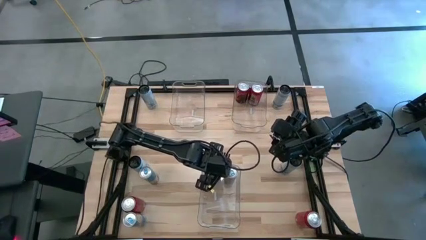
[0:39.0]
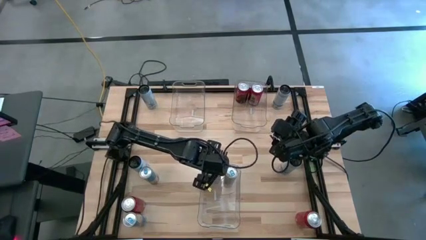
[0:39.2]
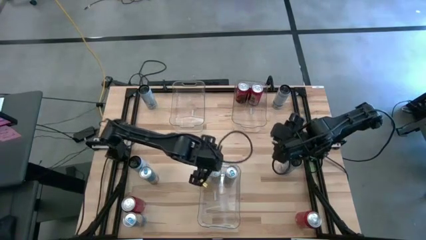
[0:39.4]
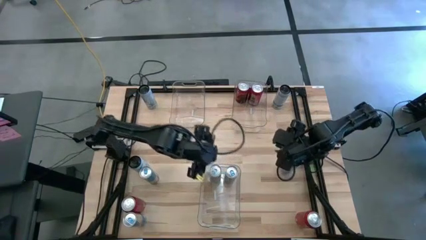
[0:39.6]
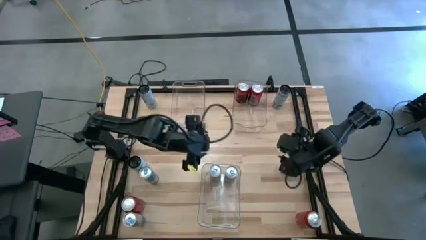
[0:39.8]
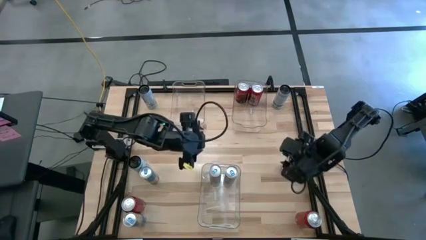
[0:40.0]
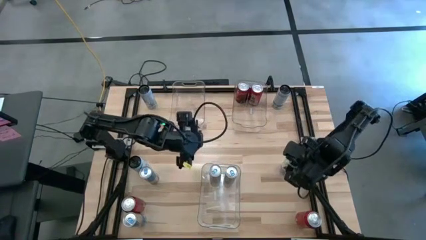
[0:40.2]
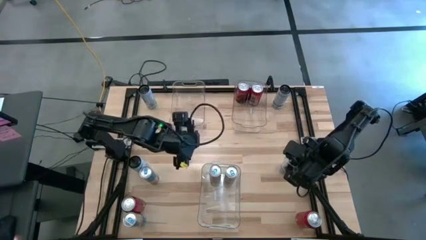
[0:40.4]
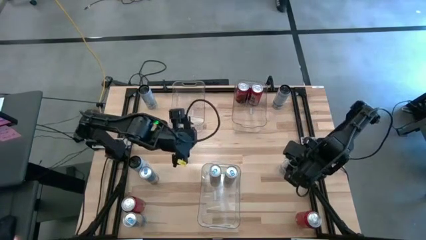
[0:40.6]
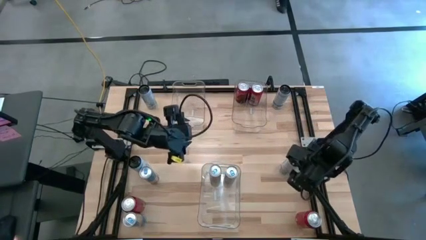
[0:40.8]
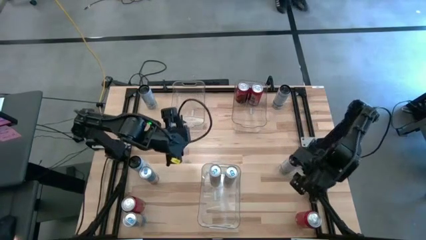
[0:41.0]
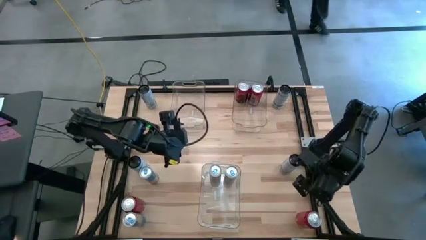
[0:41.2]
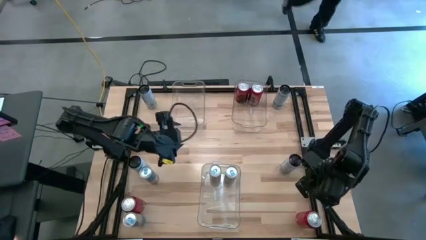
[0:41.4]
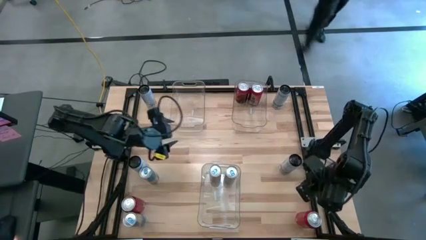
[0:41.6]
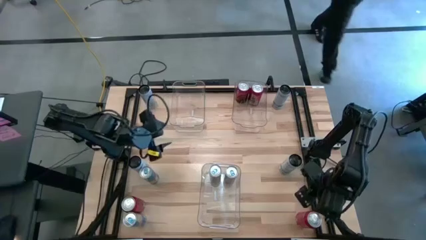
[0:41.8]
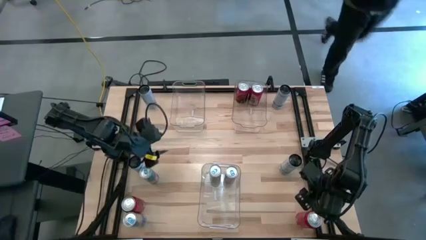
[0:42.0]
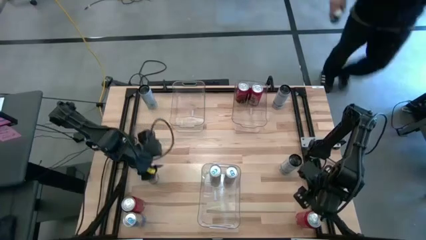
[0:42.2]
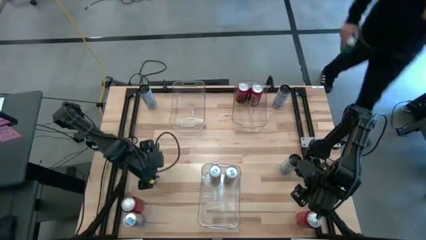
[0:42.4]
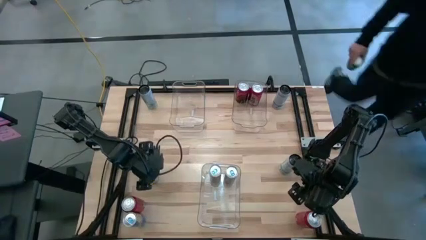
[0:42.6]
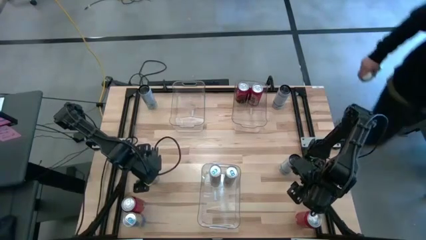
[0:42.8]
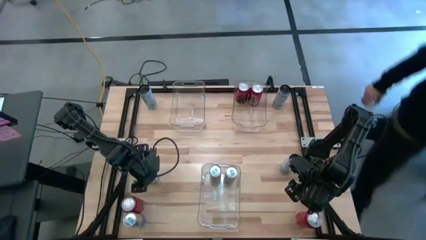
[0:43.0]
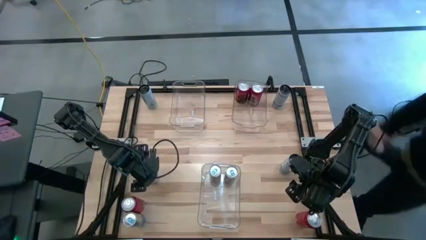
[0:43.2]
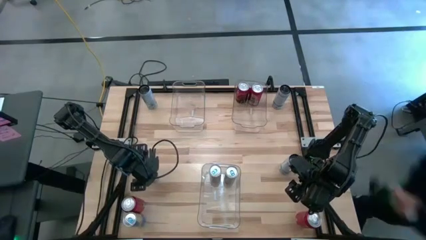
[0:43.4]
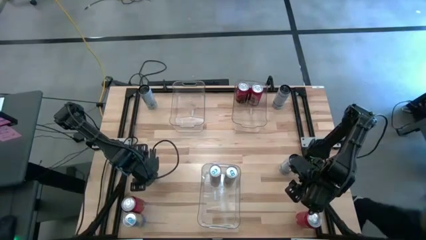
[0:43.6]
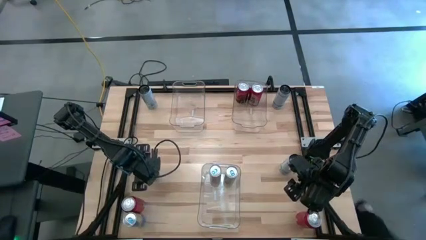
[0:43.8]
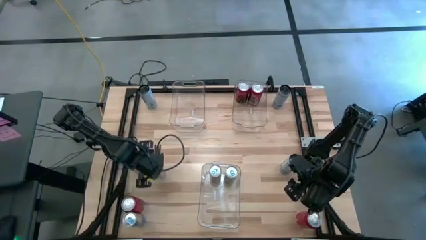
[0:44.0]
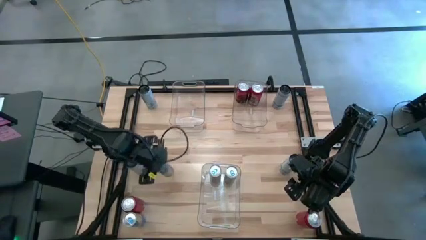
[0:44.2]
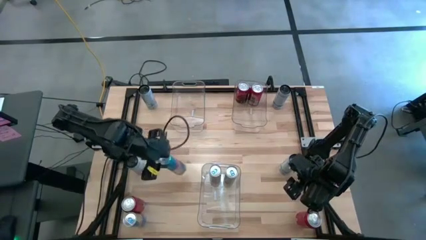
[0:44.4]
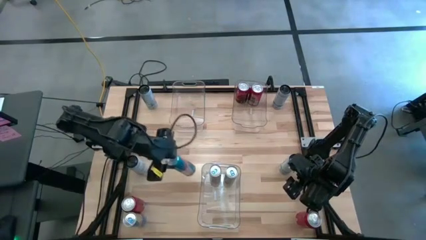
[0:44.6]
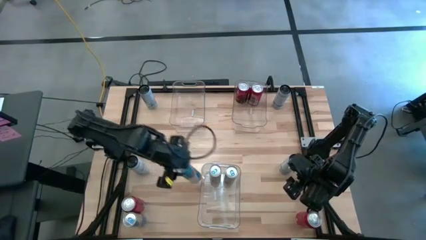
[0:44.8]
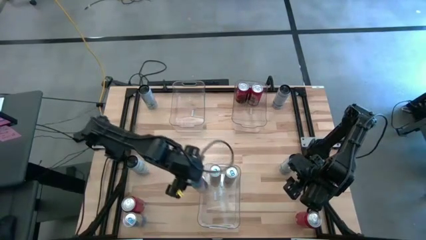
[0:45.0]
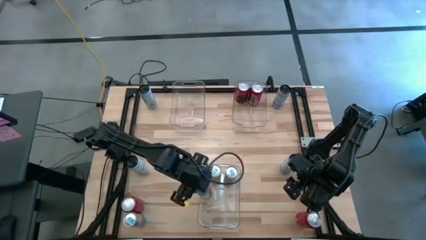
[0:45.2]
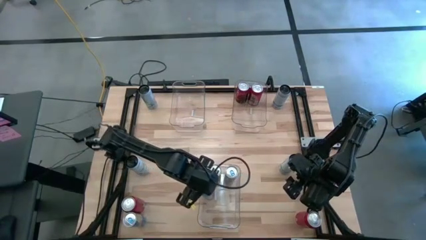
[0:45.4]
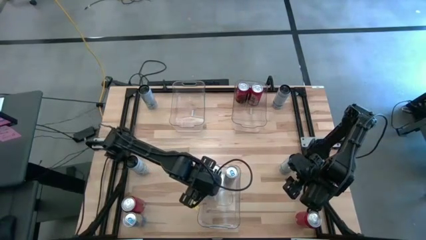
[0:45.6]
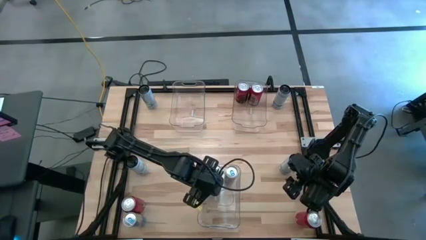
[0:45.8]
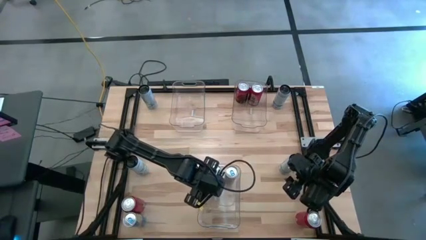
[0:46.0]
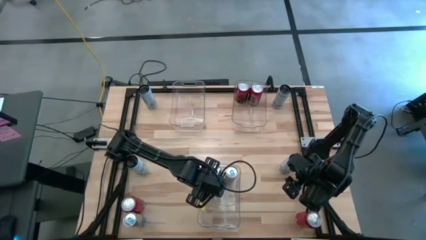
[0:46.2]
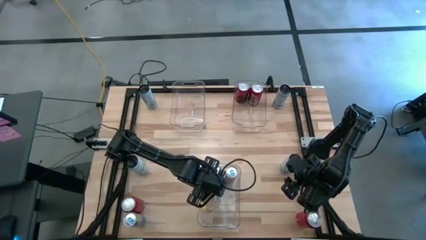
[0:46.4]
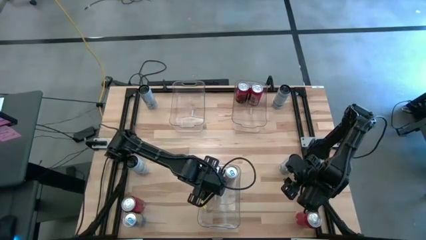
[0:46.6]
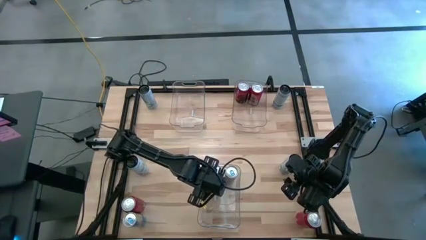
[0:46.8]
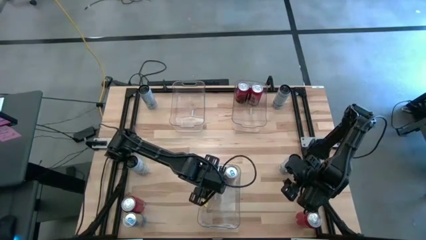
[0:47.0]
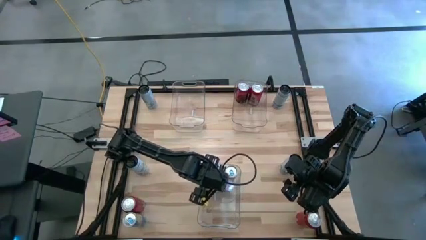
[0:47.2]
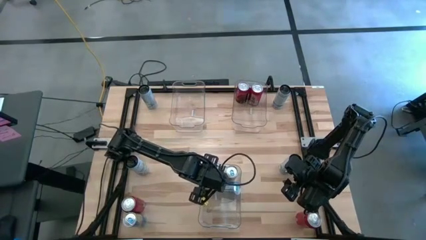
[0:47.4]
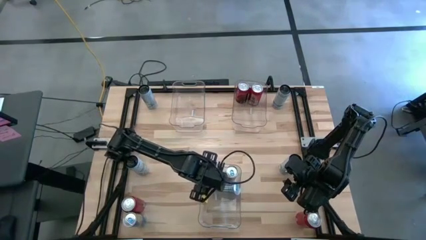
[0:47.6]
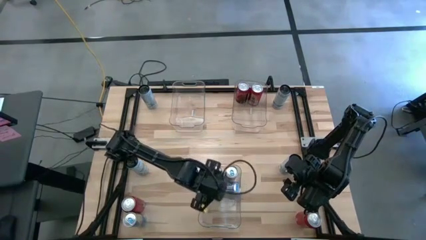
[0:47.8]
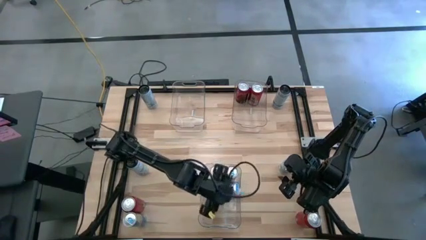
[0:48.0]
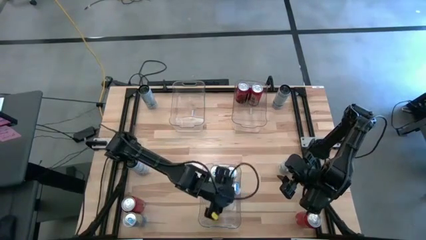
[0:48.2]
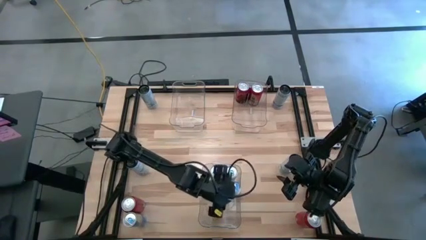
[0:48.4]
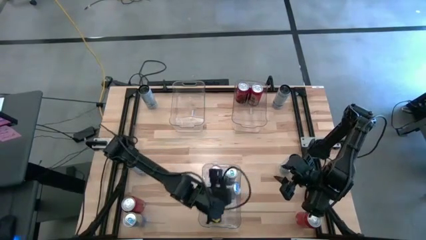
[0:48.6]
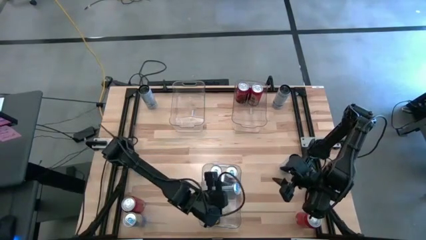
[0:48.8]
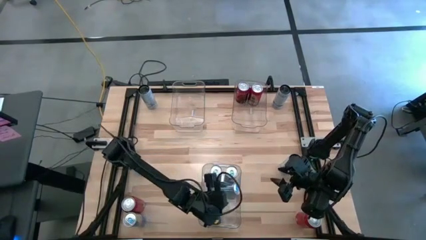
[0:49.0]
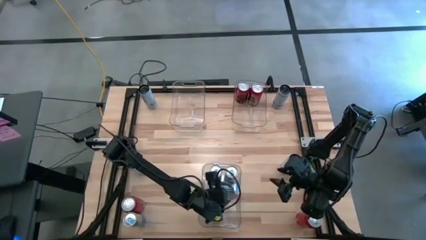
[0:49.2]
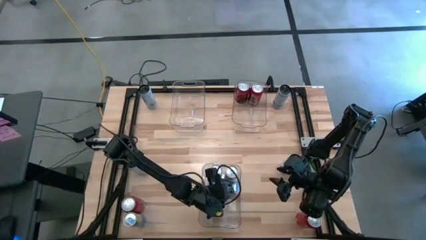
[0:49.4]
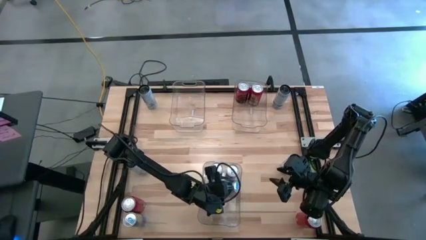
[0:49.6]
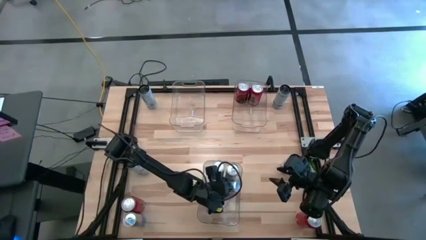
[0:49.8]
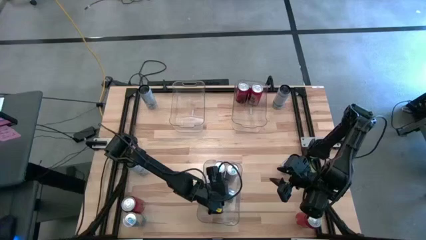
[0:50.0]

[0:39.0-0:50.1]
Task: Sort soda cans
Put the top blue soda can into the bottom transparent bin

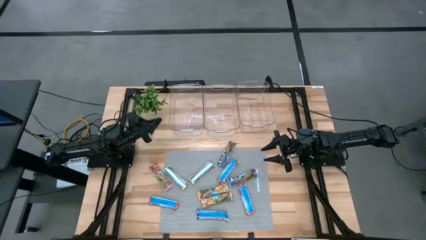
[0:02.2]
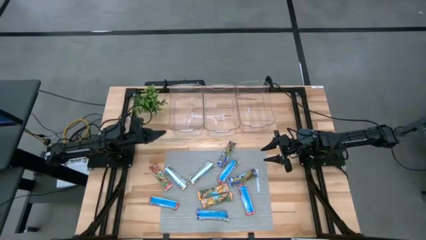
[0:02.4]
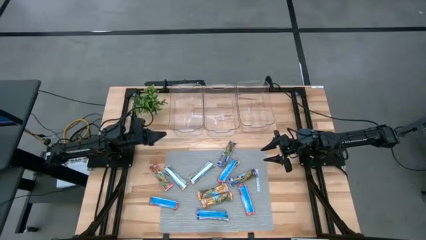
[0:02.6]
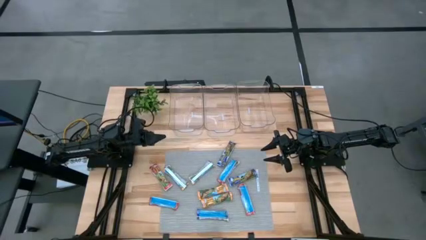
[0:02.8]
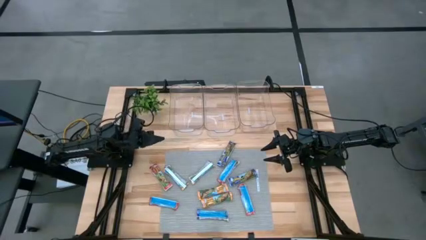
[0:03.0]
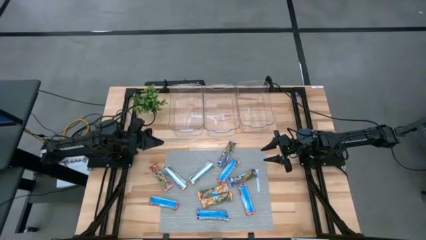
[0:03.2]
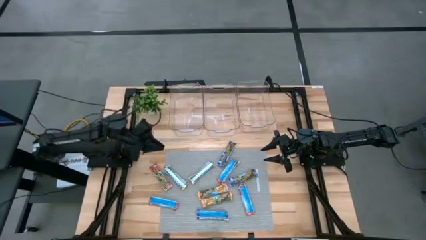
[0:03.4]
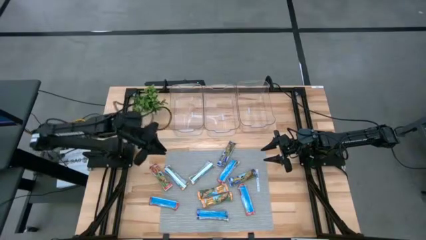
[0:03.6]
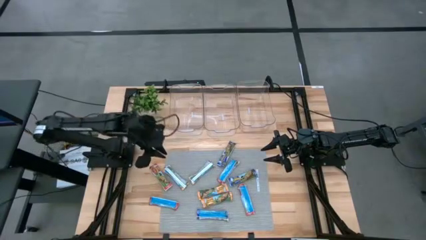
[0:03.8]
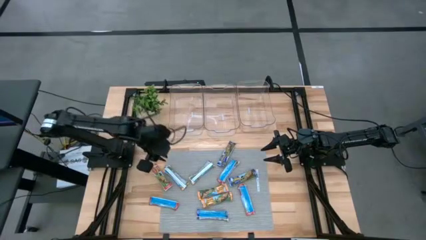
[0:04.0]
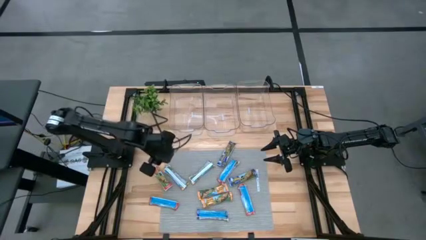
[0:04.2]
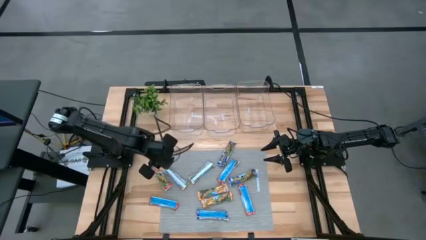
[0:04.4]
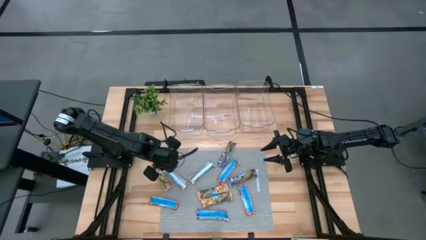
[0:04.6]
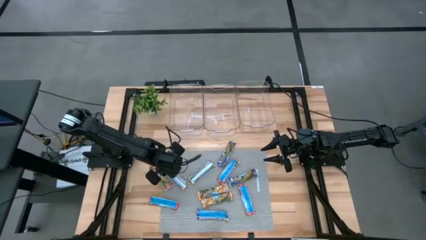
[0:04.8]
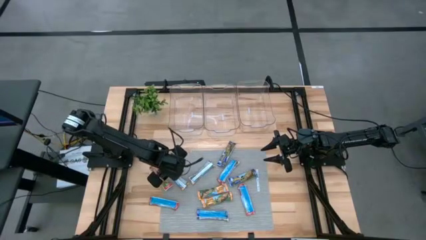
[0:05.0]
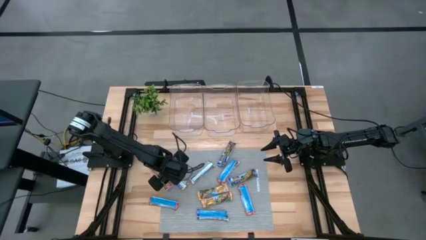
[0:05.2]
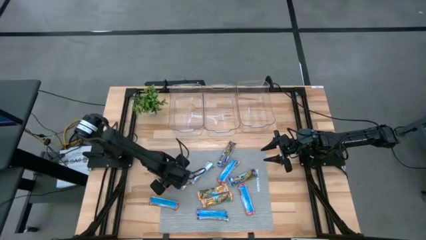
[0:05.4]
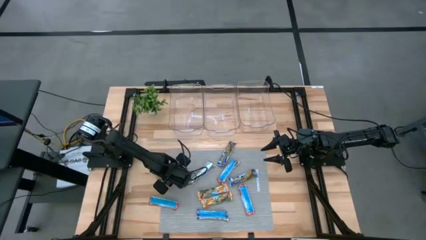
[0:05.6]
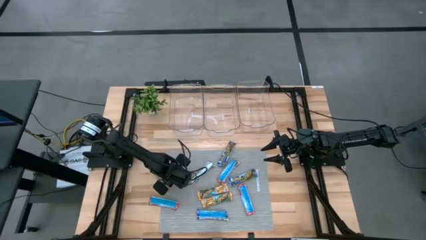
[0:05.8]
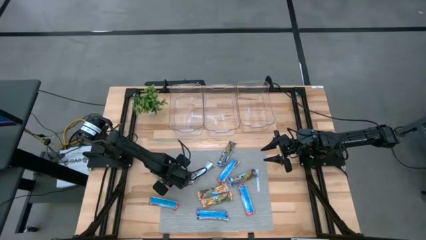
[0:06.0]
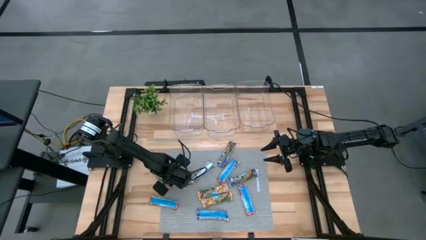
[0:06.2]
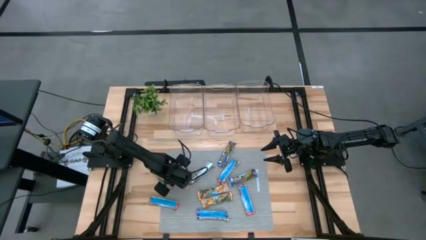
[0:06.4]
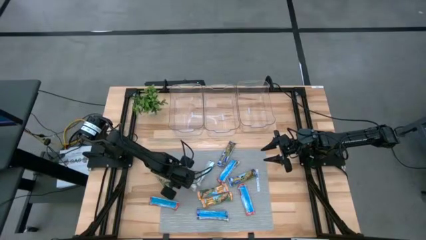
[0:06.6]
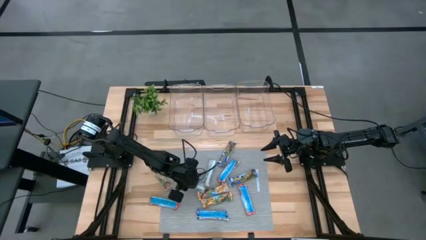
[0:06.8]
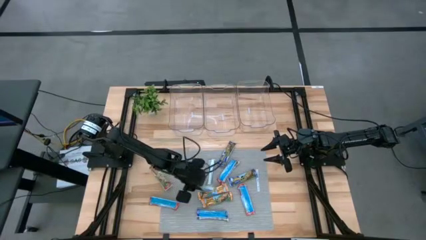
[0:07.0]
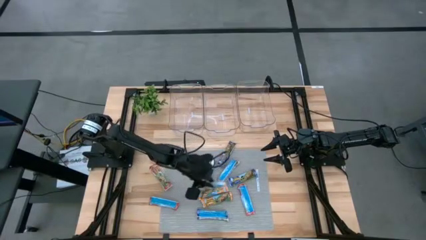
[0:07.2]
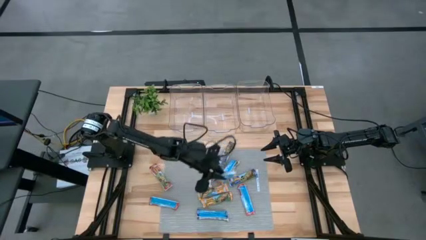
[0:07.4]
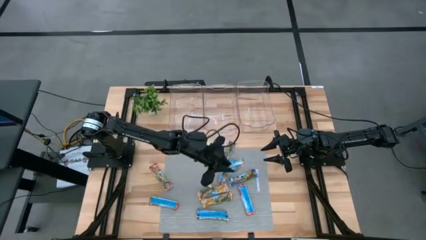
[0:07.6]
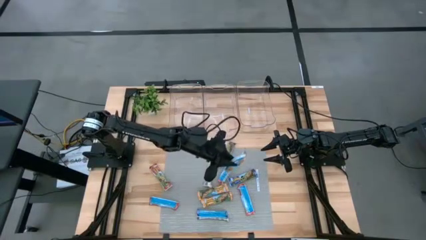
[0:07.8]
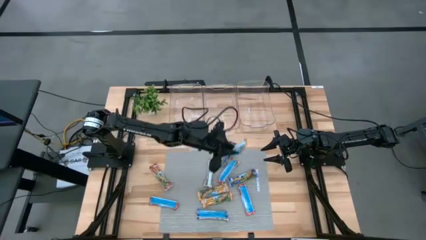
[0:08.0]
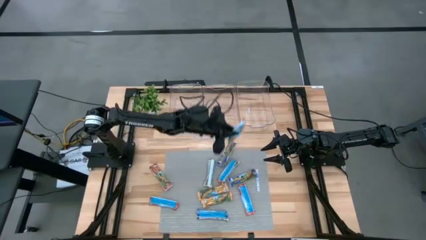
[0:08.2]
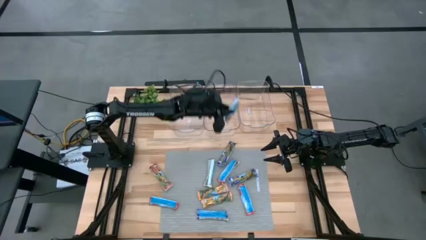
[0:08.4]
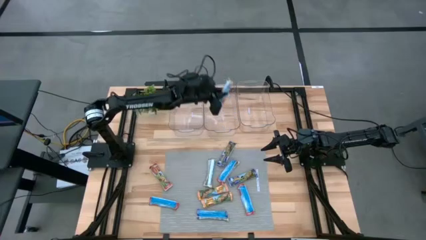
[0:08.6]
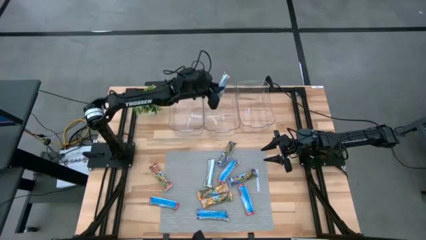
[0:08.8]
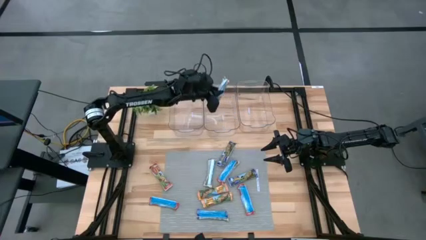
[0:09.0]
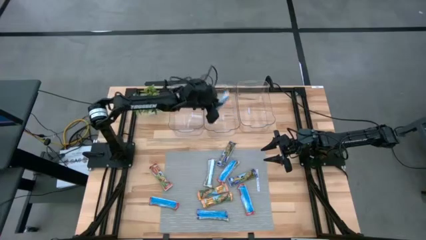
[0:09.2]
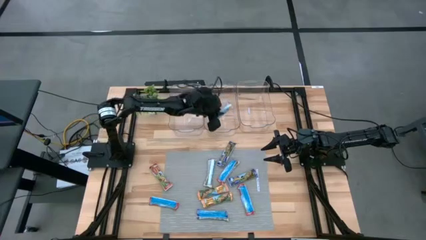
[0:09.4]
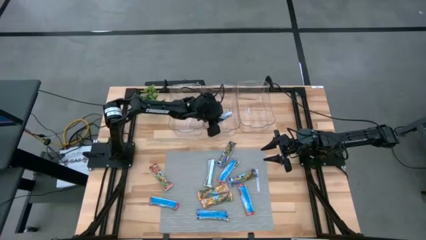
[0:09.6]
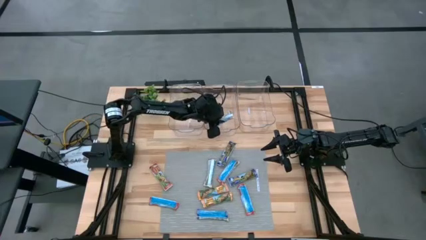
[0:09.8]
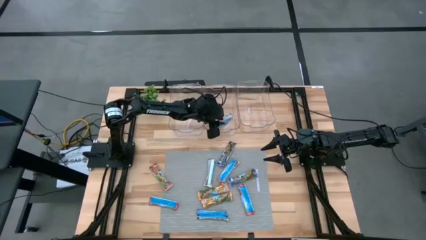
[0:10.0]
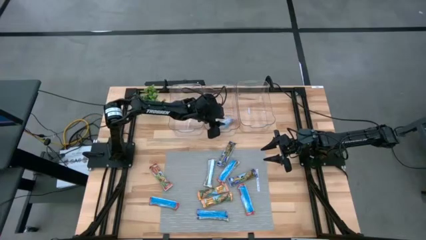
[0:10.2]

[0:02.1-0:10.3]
Task: Pick and place Granola Bars by type
Put the yellow granola bar into the middle transparent bin
